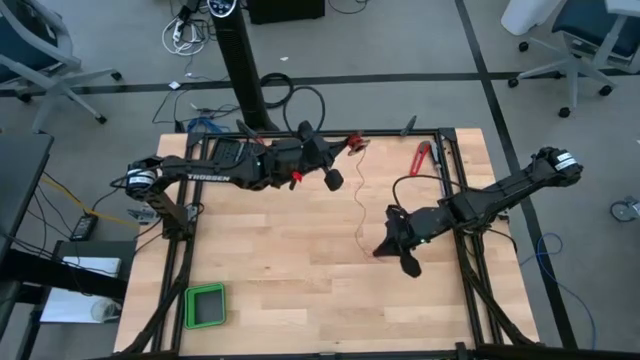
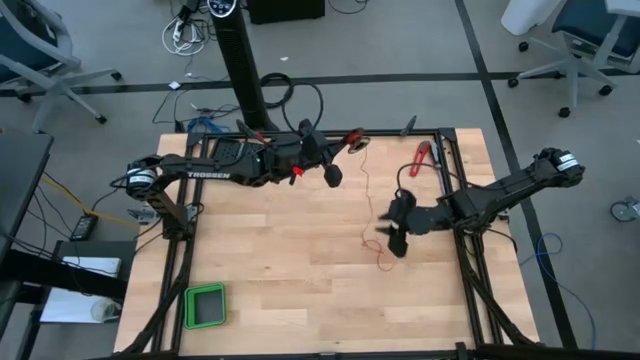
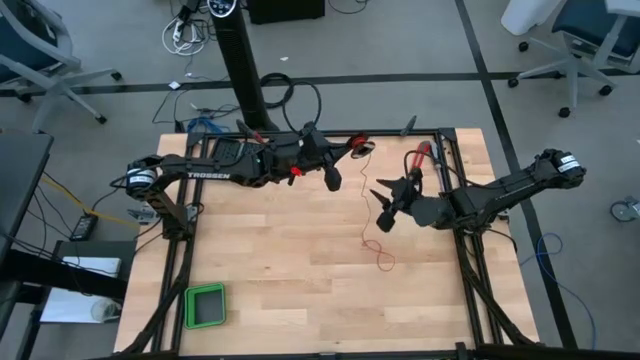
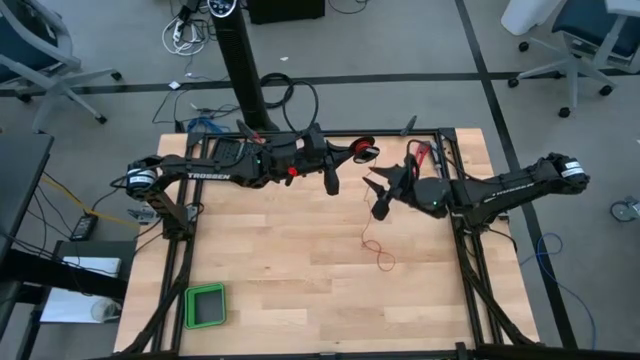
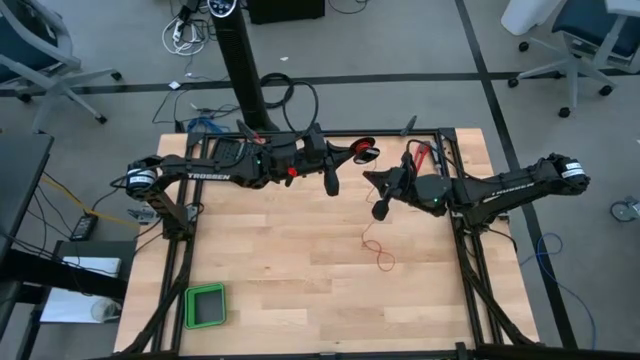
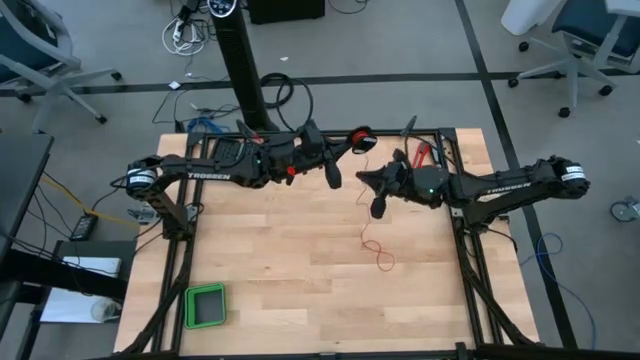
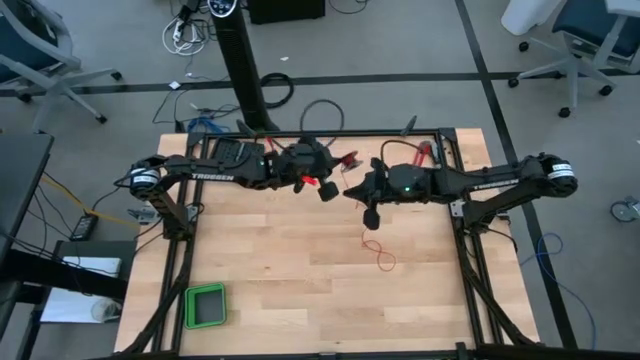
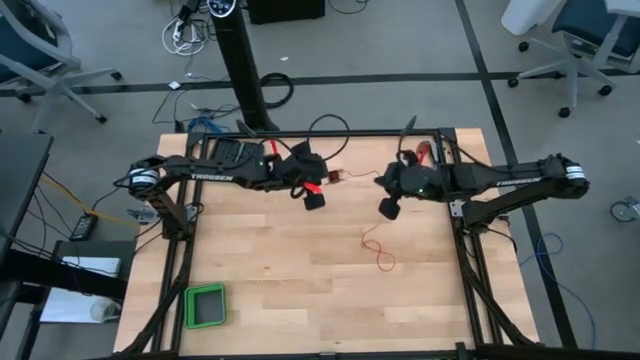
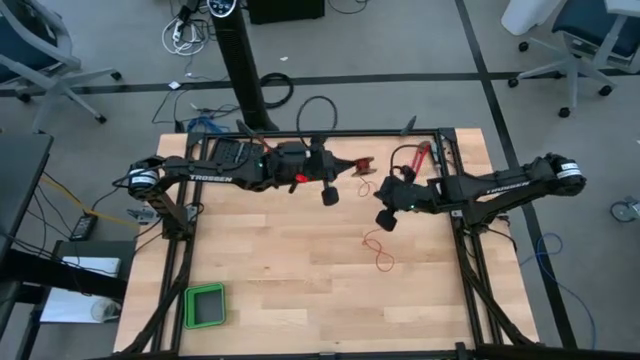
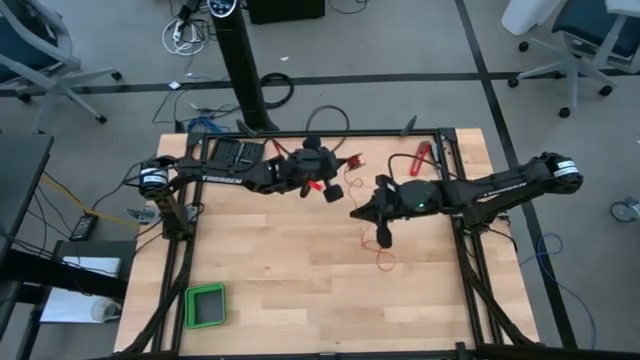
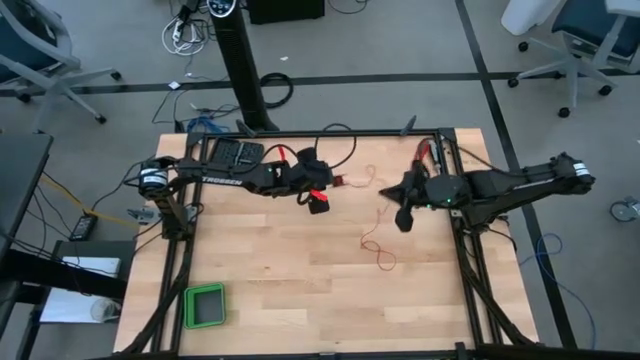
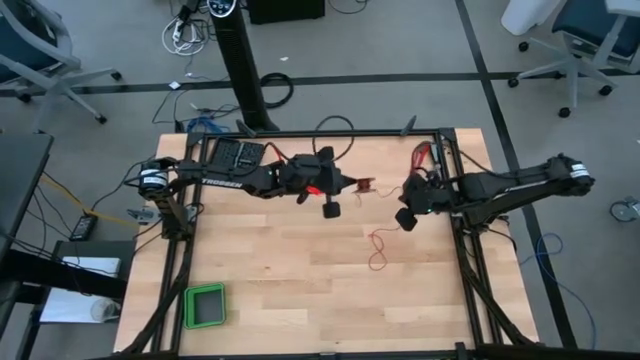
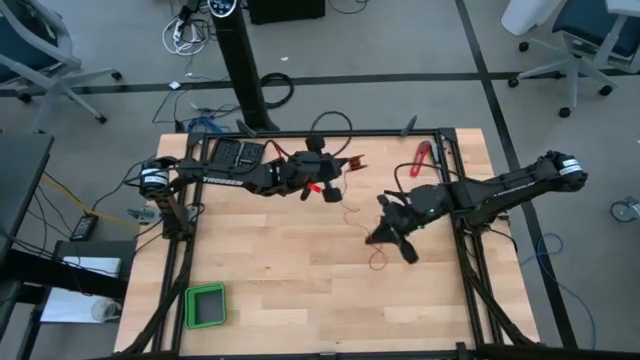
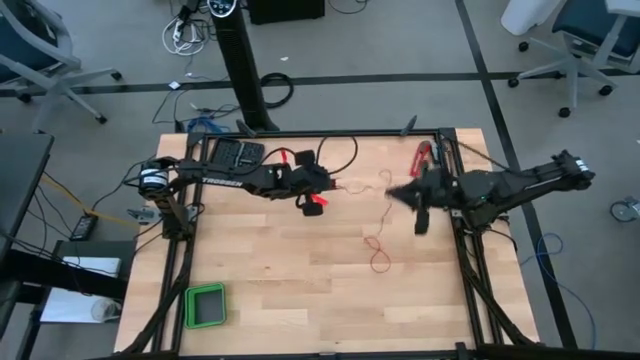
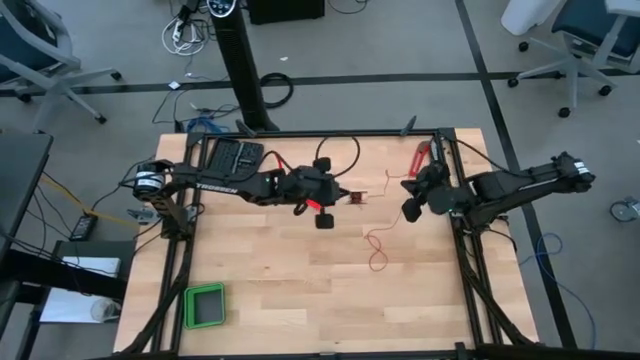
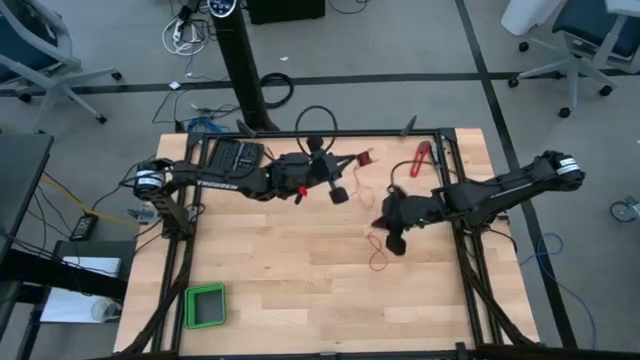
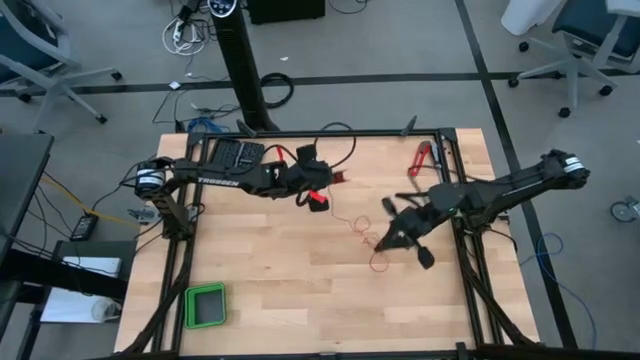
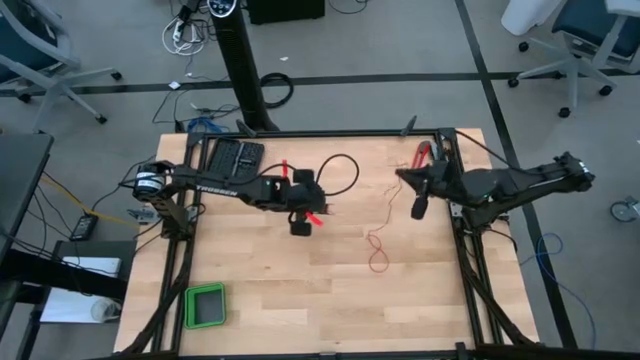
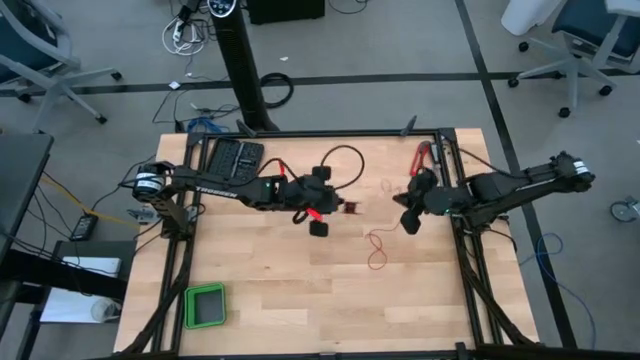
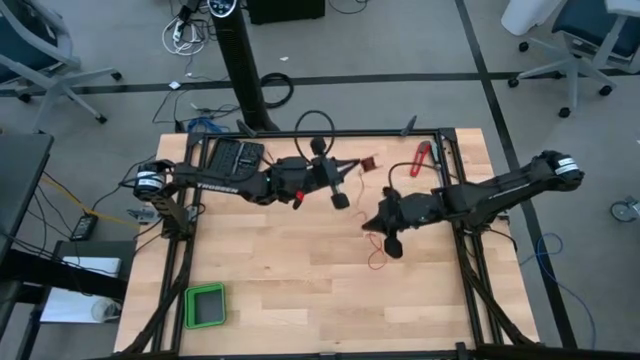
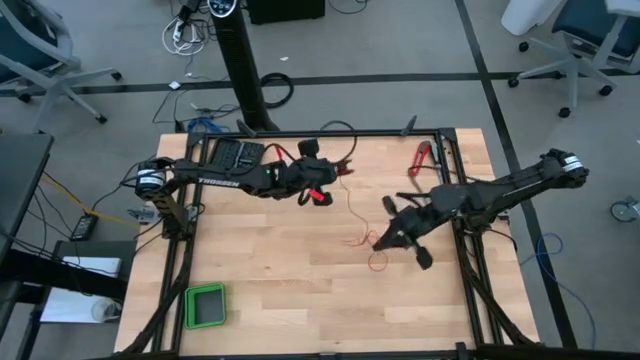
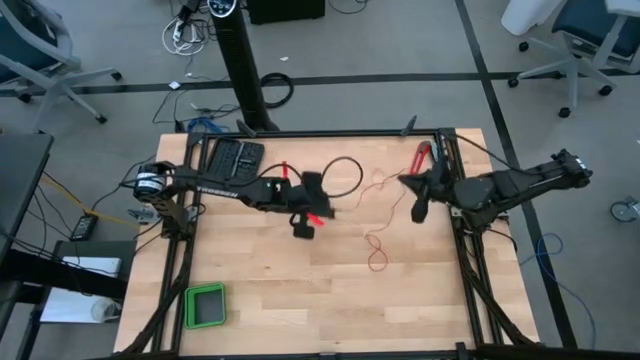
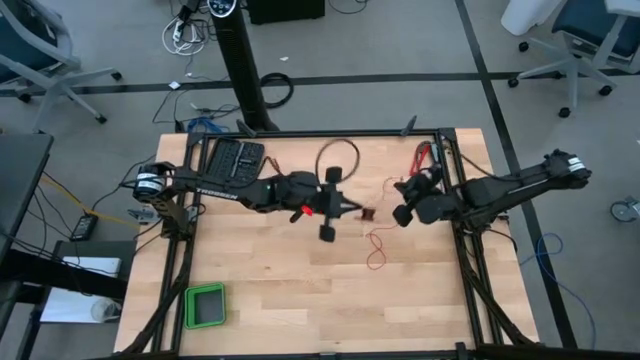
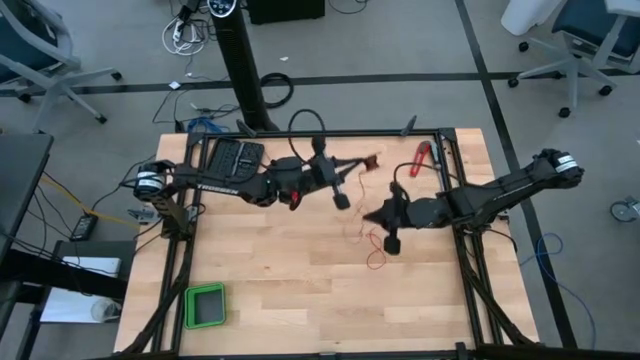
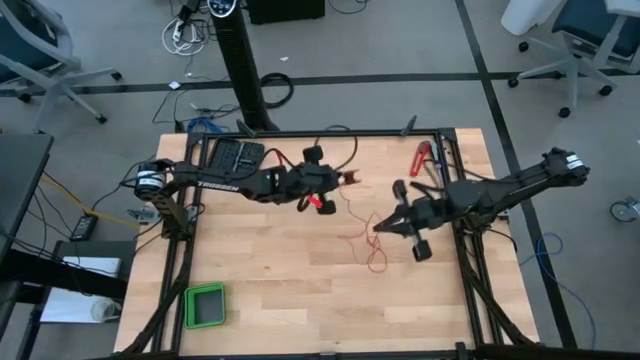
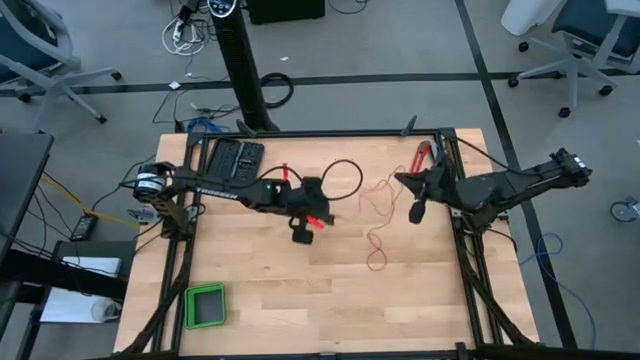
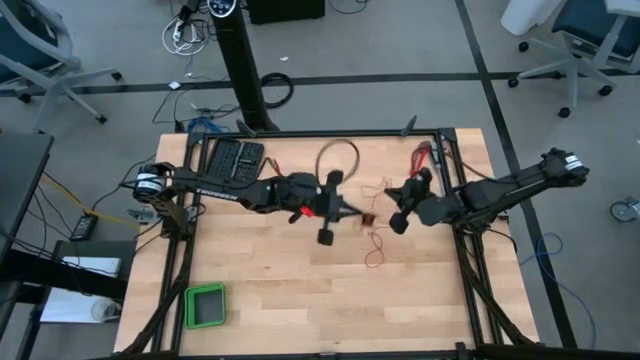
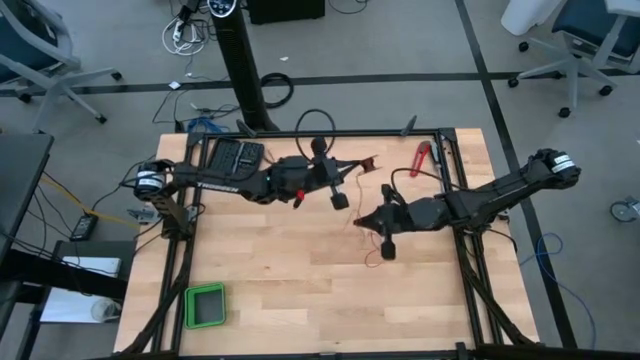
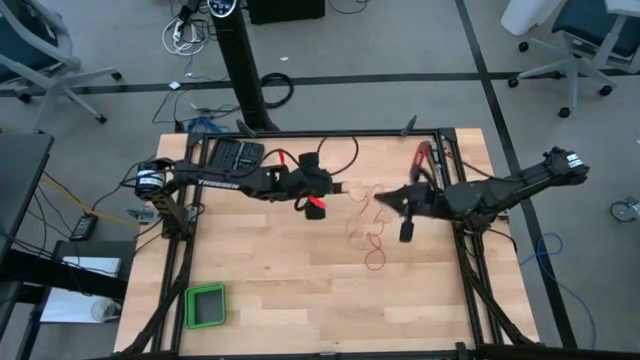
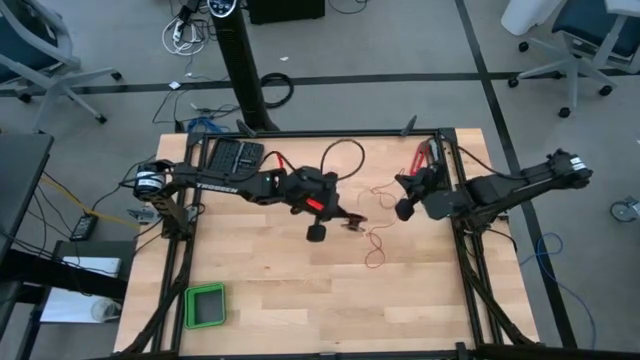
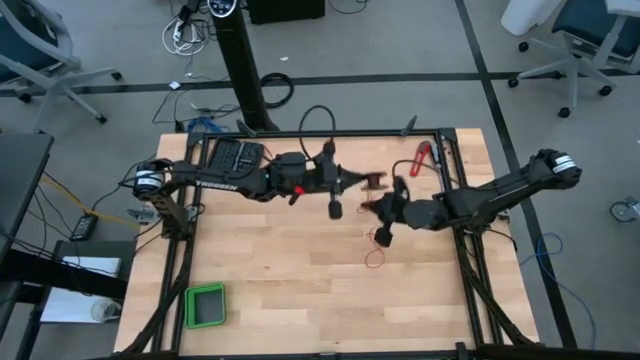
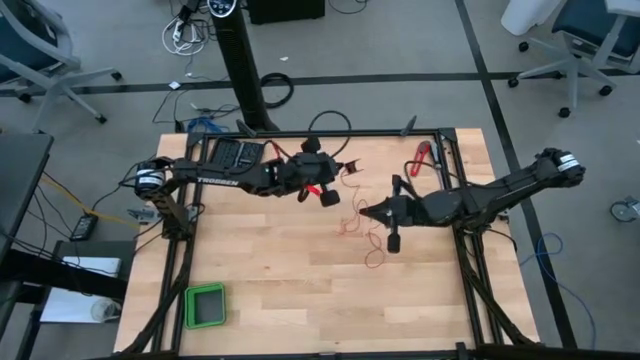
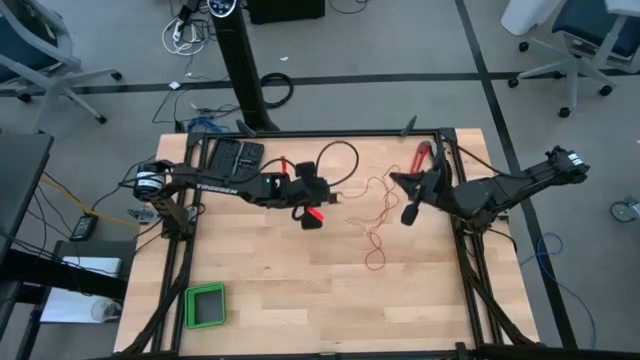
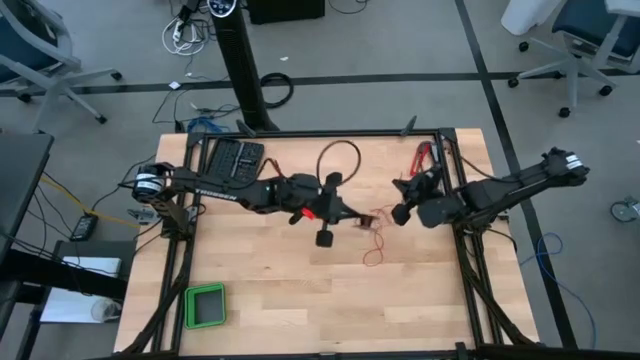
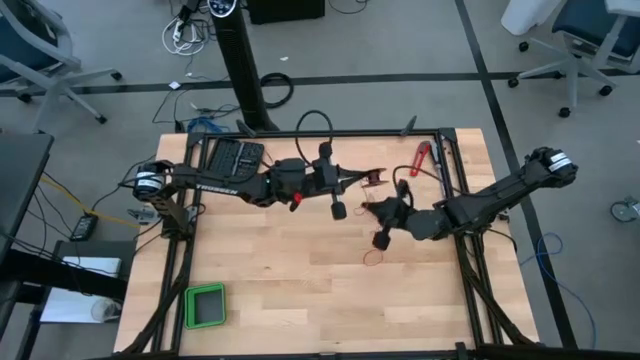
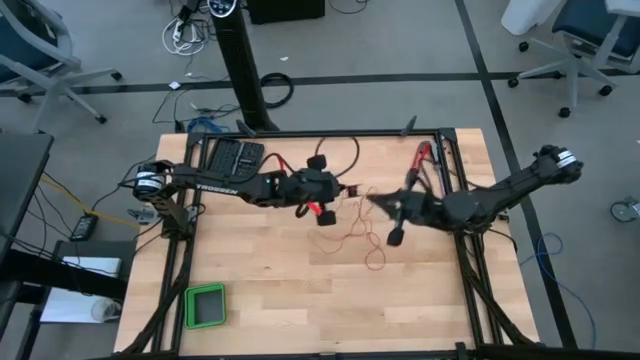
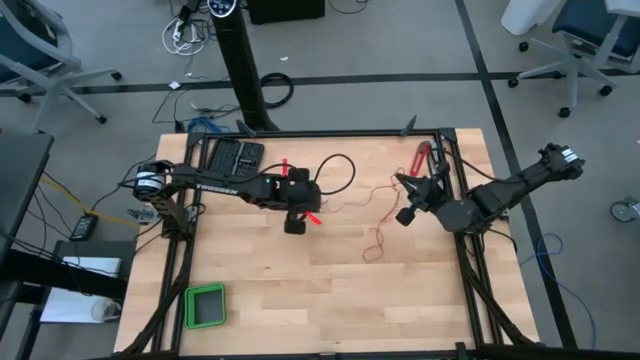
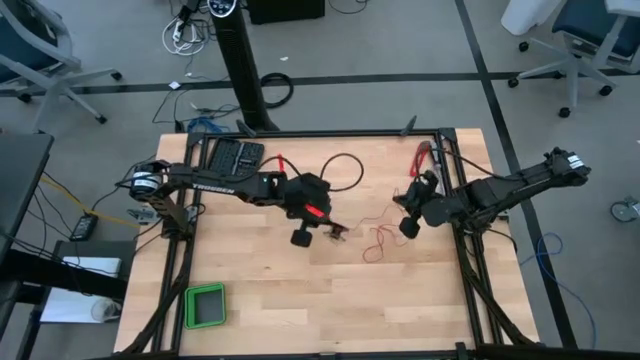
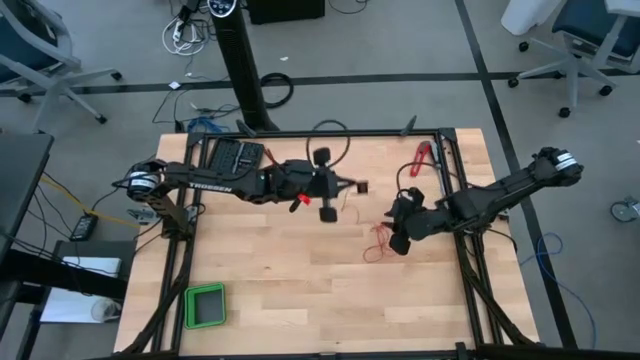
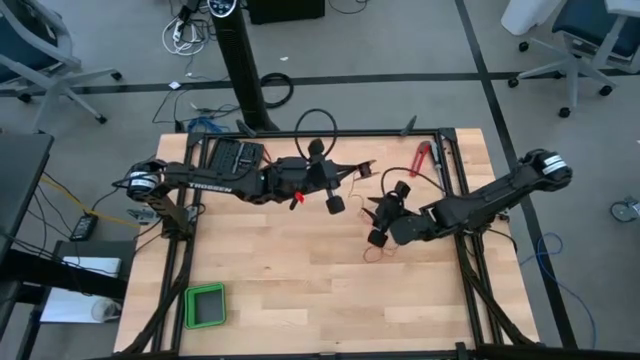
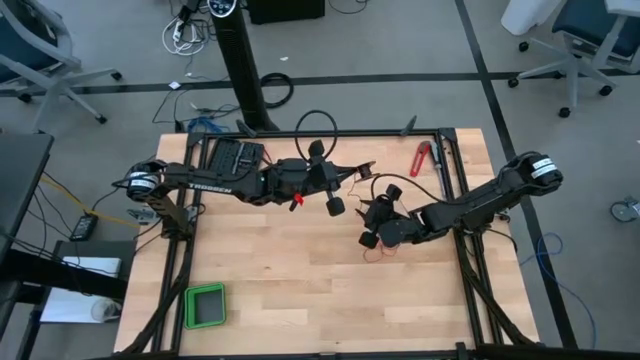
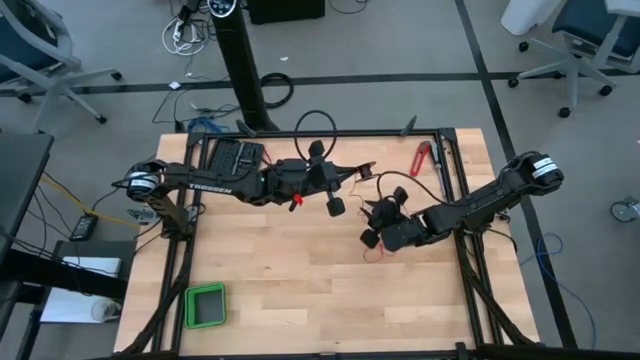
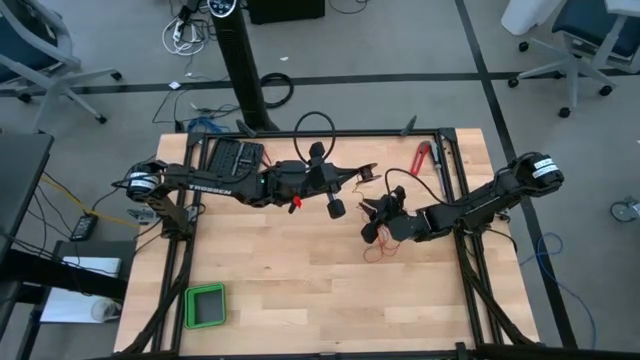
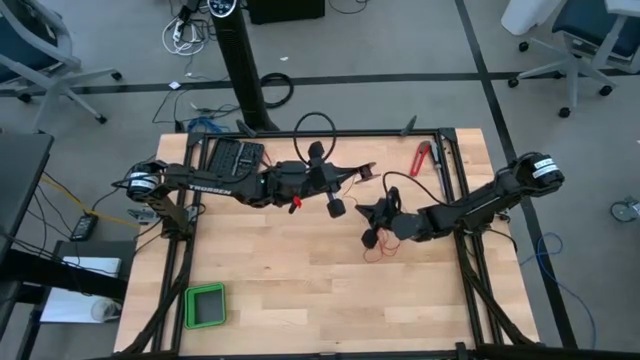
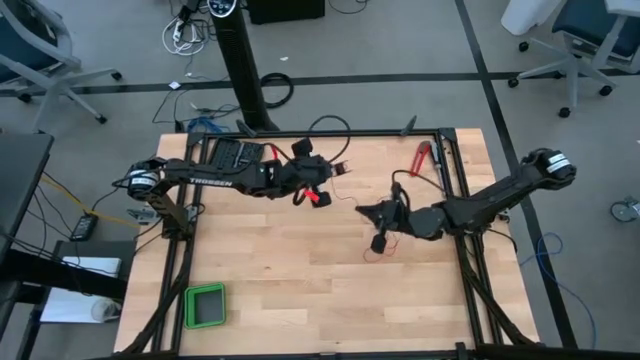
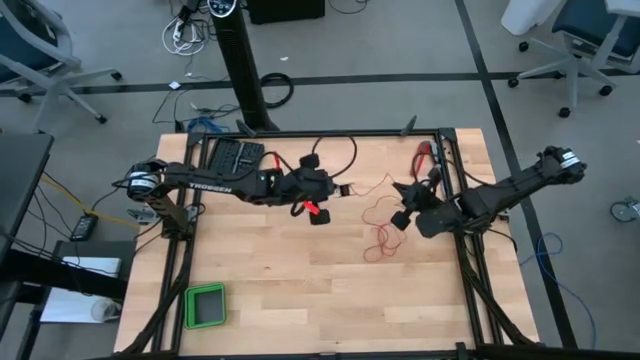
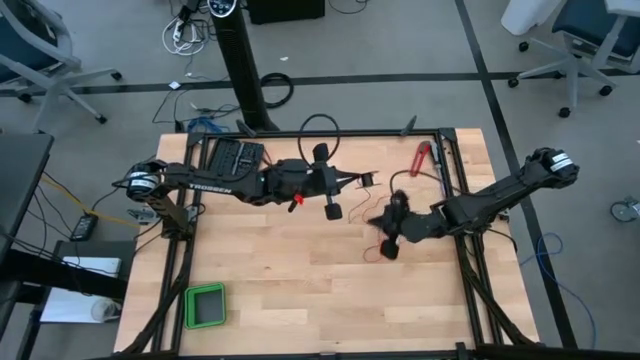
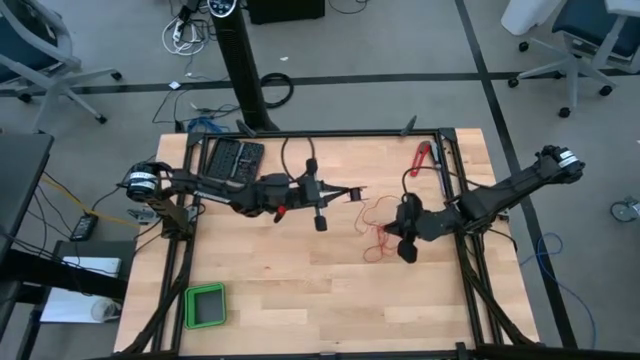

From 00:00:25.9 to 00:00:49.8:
Task: Coil cords
Uncoil the red wire from the black spool
